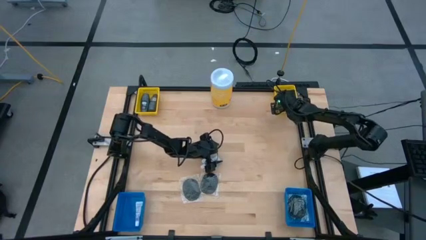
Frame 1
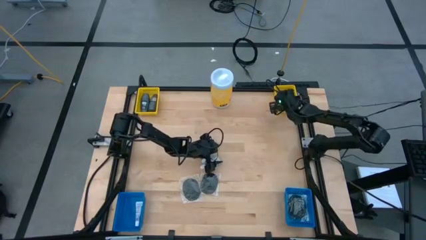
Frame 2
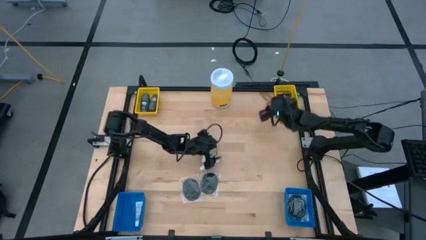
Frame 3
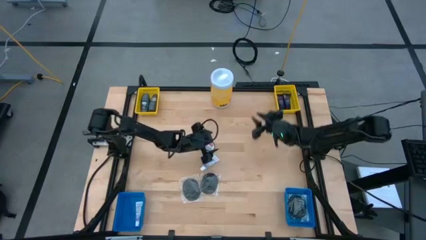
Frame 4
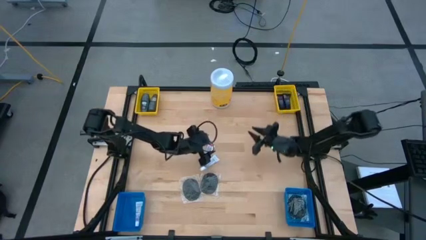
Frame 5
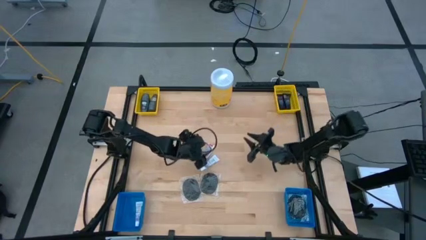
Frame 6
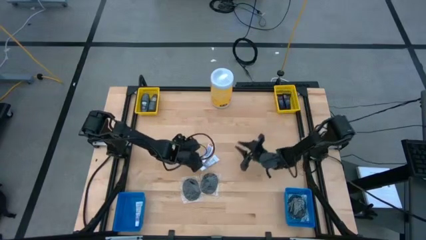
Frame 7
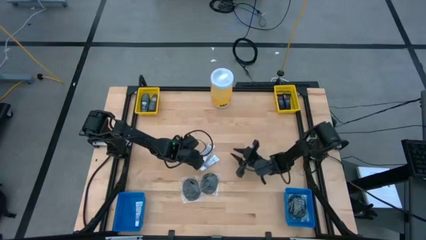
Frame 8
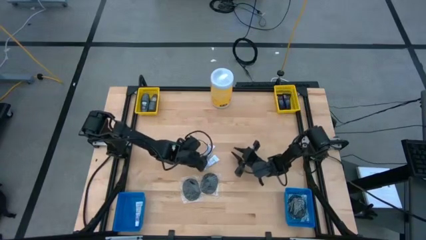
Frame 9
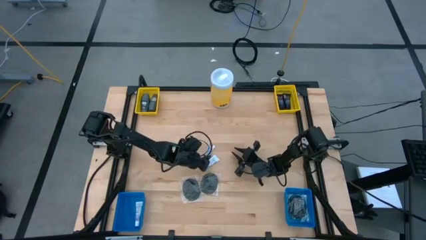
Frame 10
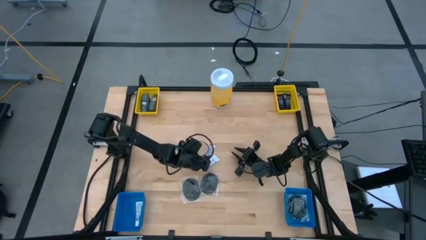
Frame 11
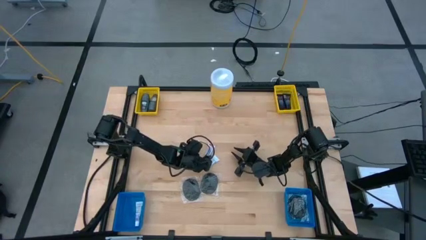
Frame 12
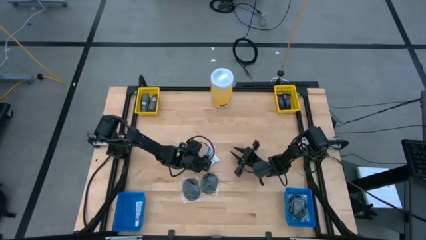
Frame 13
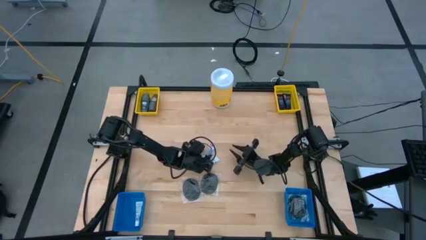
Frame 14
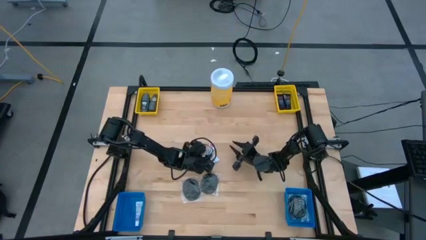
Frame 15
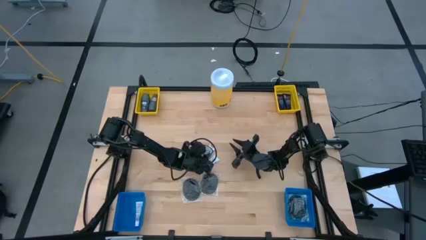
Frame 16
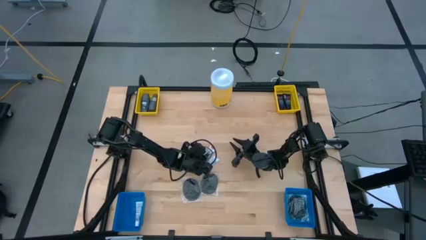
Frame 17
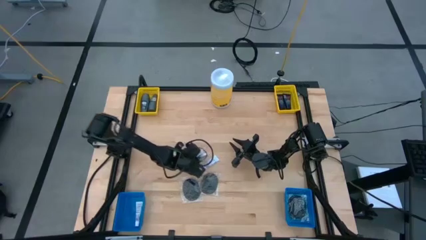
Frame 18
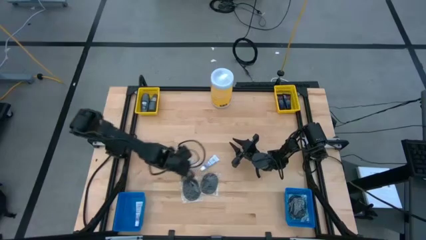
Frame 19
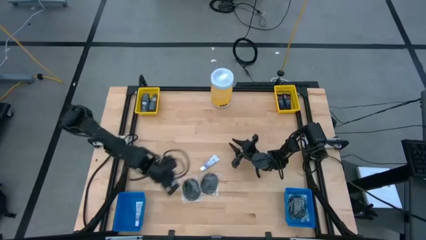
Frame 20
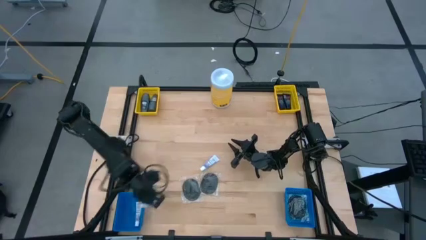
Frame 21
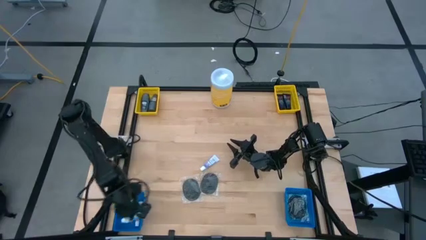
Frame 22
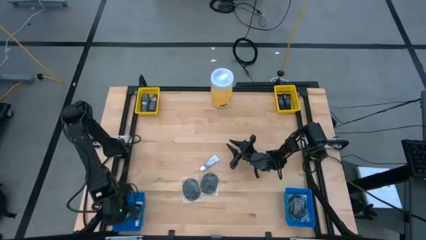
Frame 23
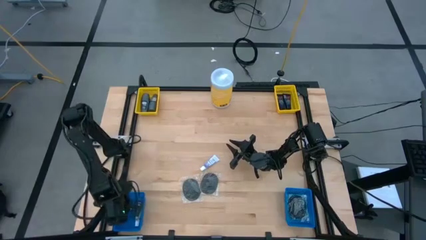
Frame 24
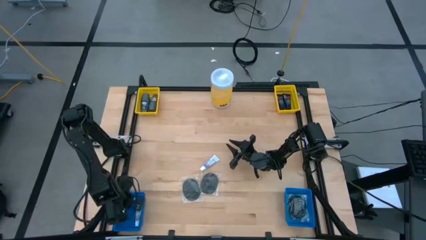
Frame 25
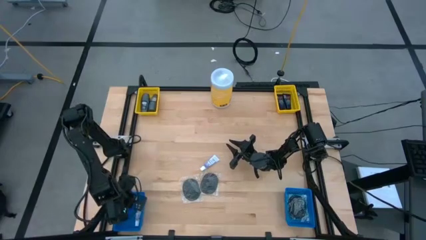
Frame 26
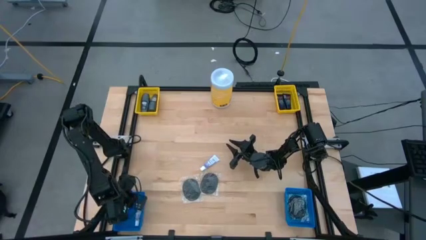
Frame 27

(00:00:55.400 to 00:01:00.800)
Task: Pick & Place Travel size toiletries
Put the white toothpaste into the left blue bin

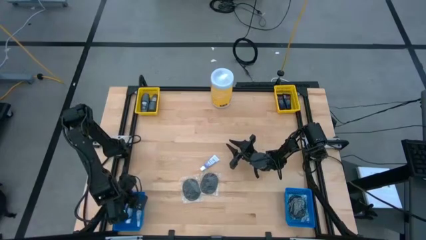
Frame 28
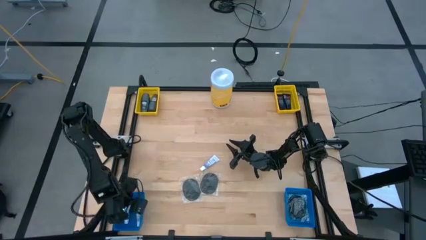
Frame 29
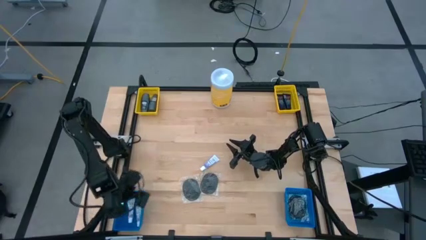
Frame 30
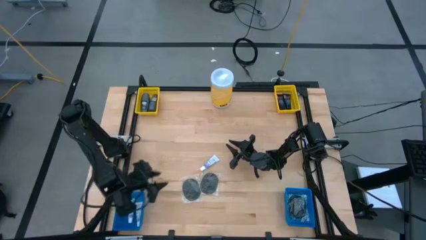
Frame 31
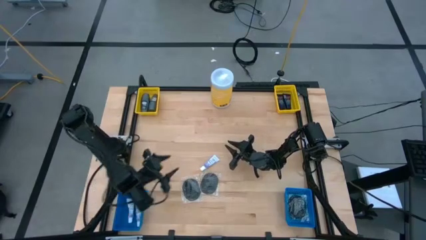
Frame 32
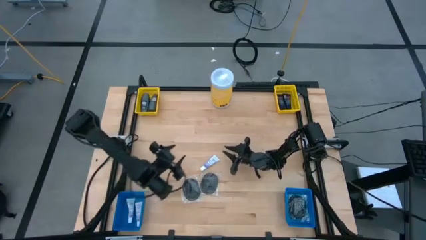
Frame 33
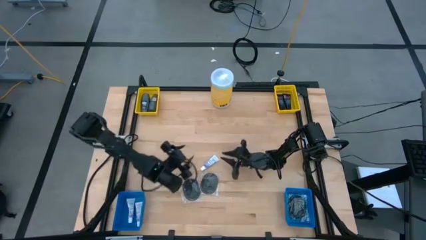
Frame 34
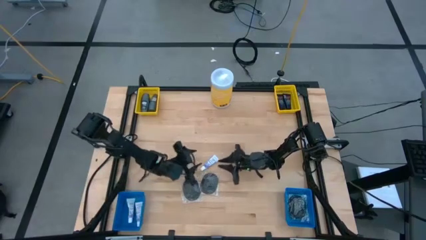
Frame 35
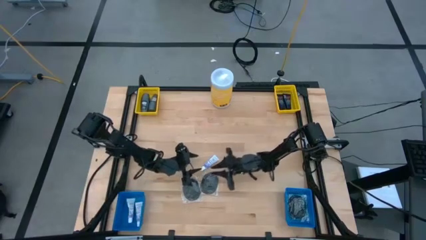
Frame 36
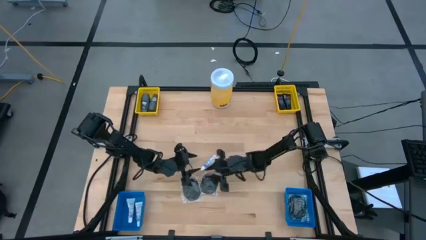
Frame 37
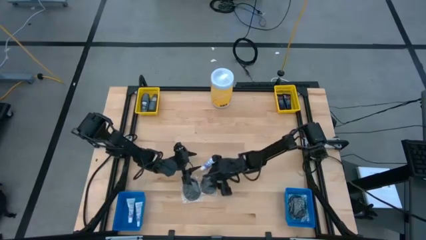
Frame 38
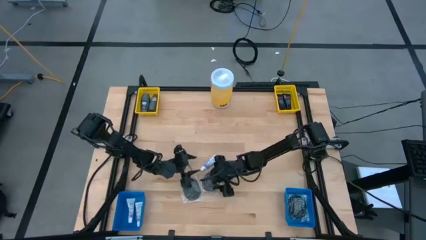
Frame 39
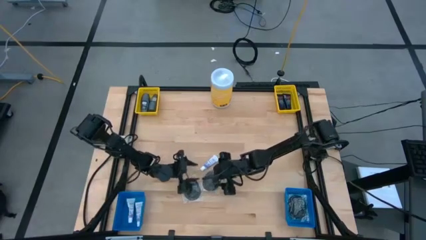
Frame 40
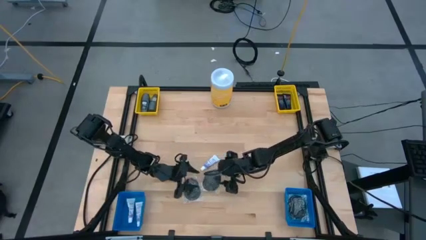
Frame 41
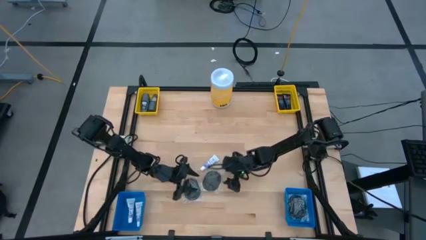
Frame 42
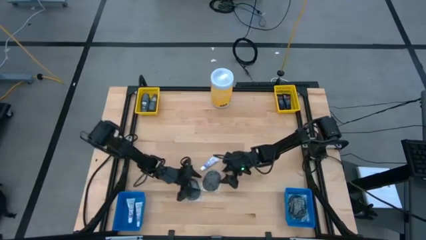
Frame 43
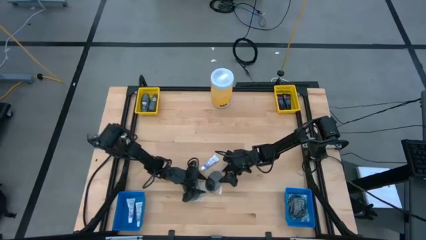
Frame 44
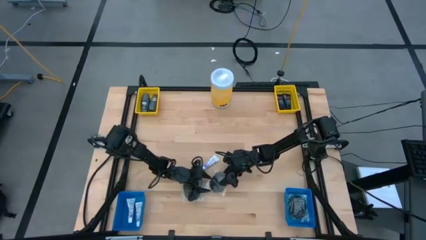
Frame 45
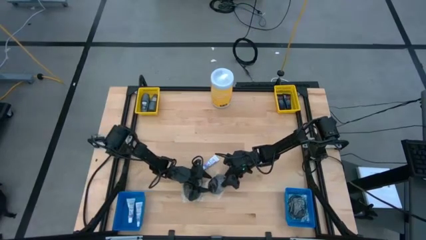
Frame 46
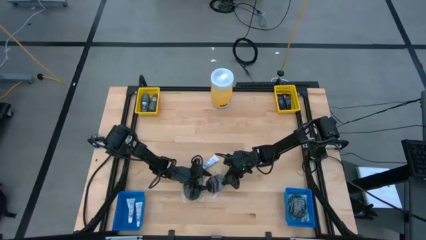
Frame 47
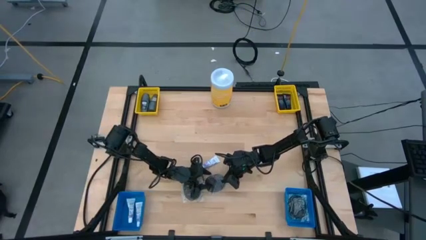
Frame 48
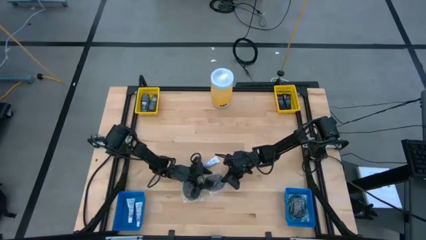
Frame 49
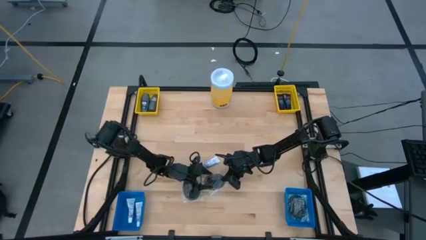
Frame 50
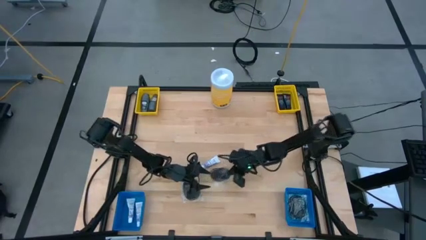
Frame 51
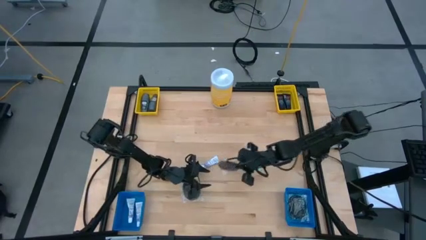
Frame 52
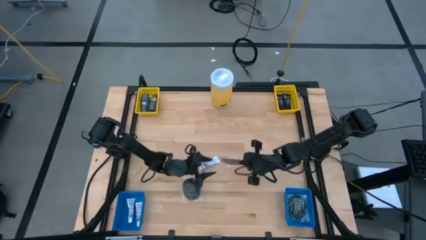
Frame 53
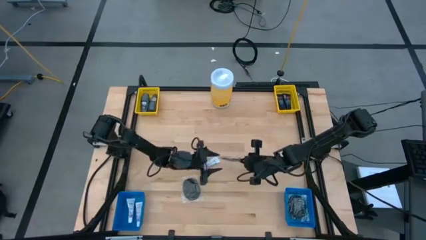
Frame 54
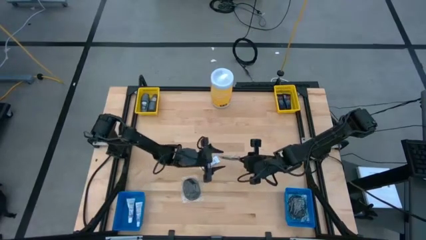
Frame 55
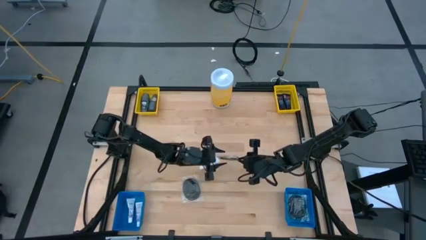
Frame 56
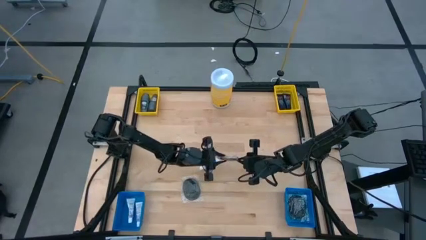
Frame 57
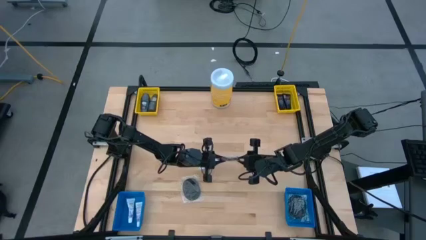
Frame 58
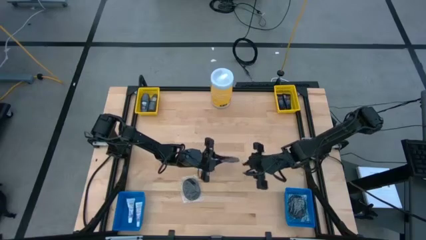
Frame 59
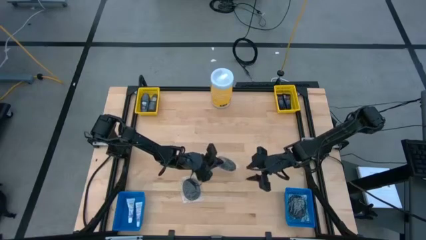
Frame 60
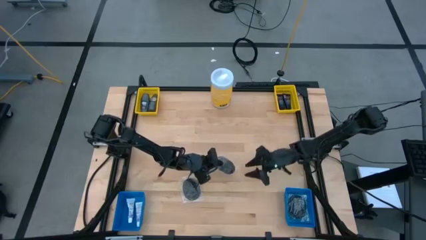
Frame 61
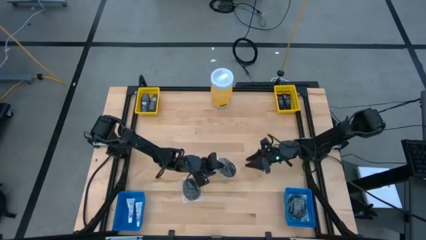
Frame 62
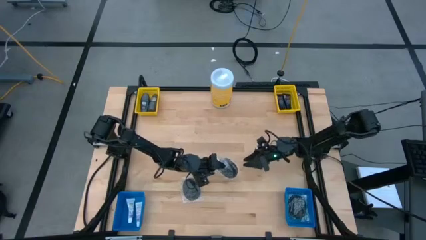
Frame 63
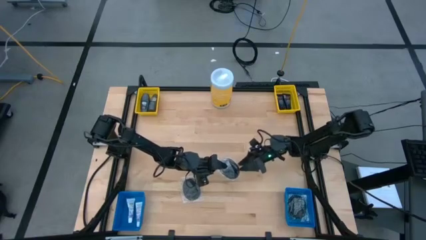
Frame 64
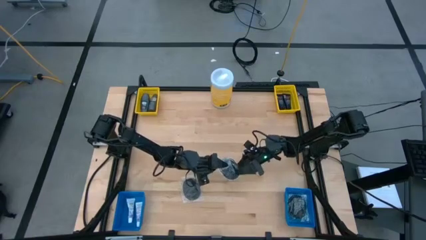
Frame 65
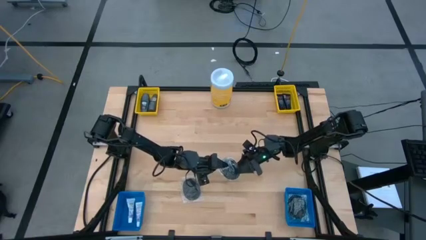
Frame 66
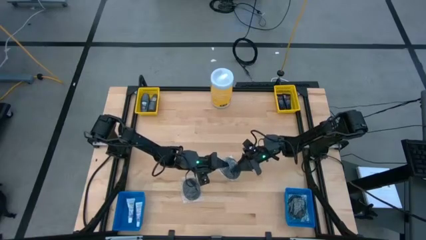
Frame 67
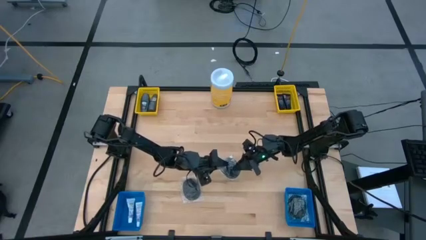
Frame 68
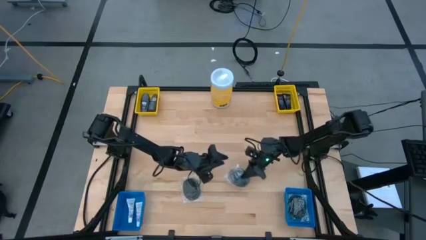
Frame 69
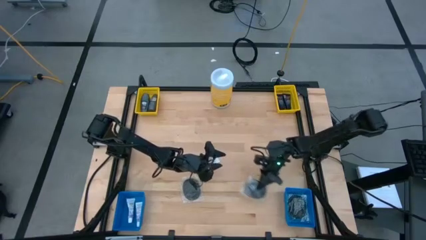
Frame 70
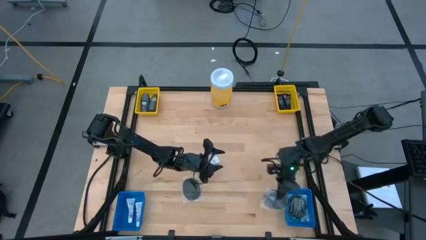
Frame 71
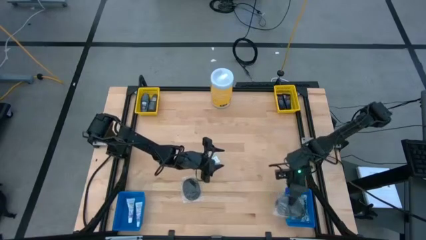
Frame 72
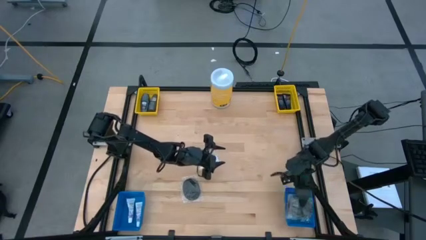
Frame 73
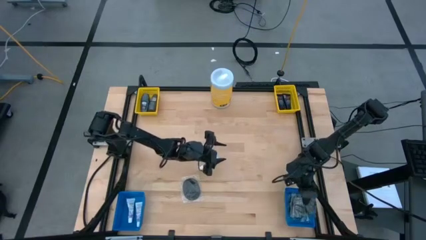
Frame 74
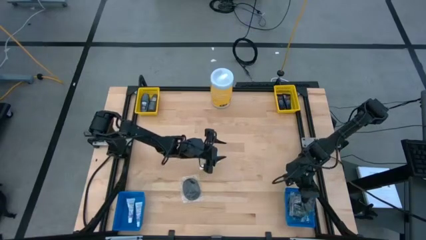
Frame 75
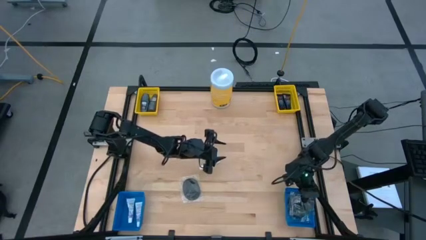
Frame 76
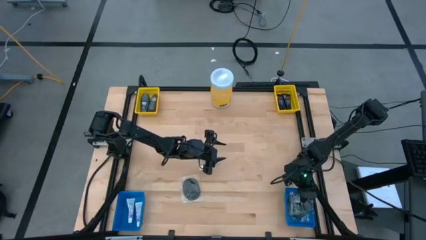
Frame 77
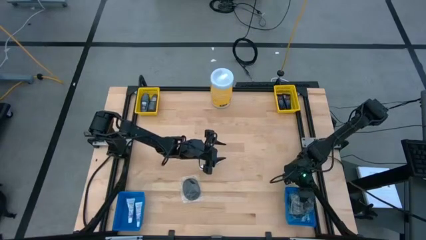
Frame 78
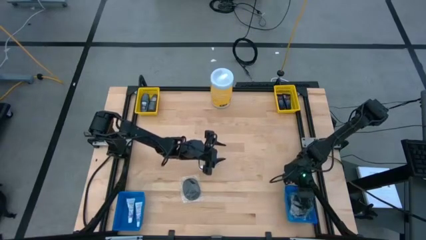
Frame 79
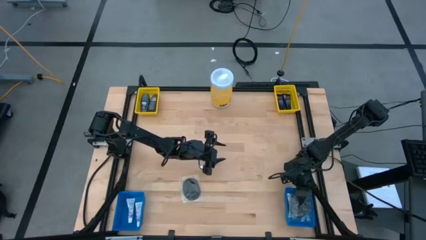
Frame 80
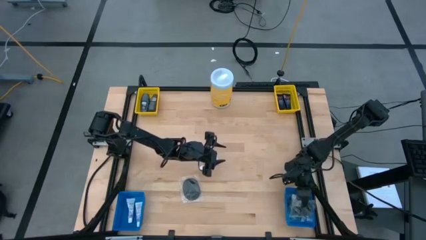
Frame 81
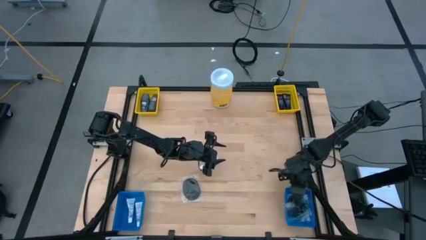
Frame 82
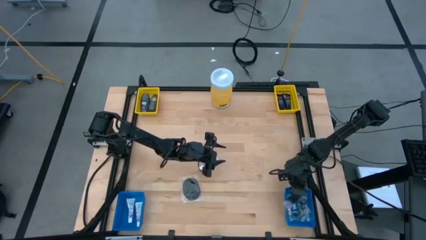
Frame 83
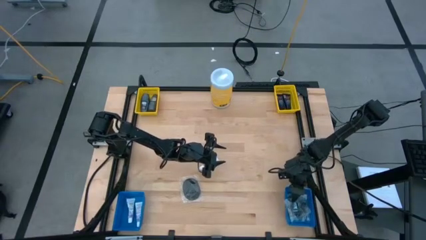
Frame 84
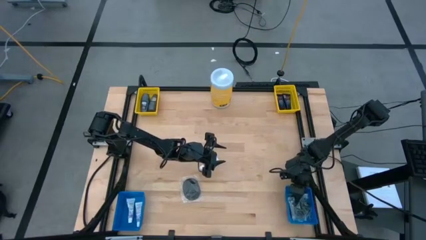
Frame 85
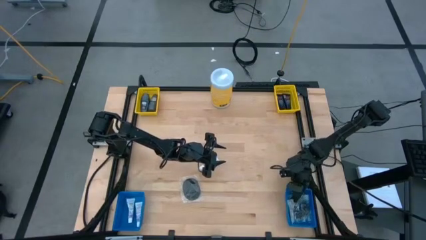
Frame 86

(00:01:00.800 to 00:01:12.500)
Put the black hairbrush into the right blue bin
